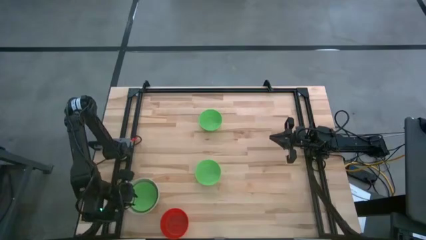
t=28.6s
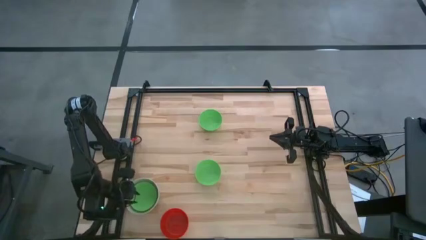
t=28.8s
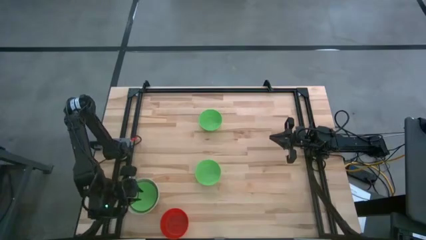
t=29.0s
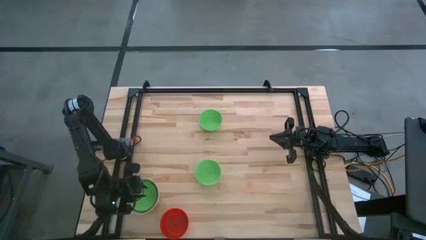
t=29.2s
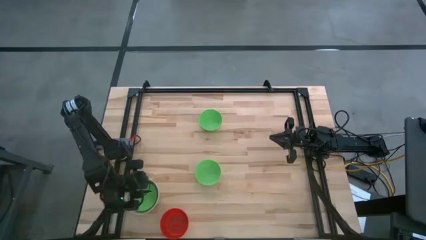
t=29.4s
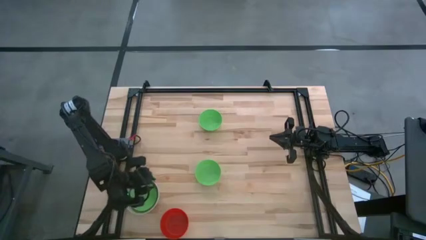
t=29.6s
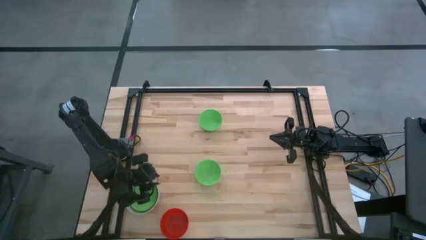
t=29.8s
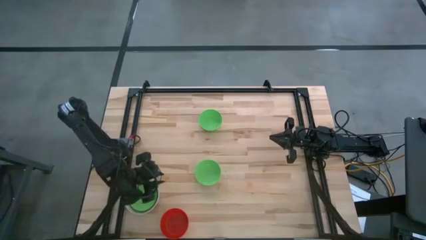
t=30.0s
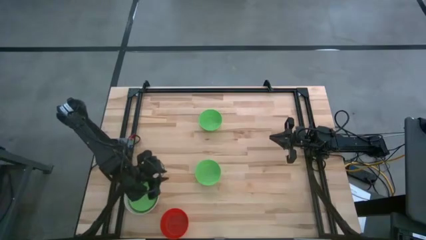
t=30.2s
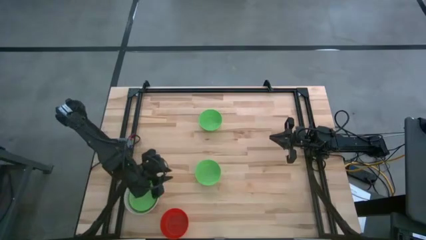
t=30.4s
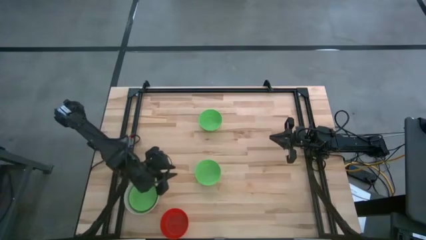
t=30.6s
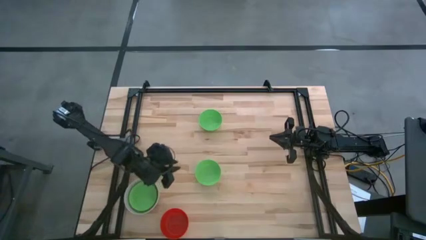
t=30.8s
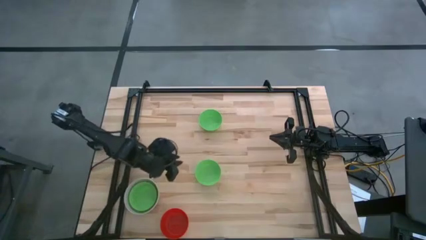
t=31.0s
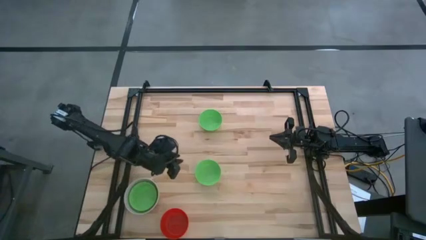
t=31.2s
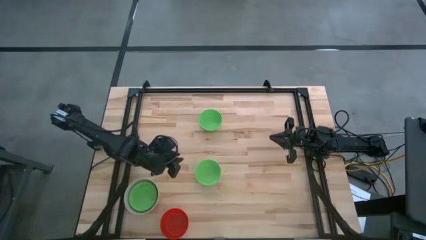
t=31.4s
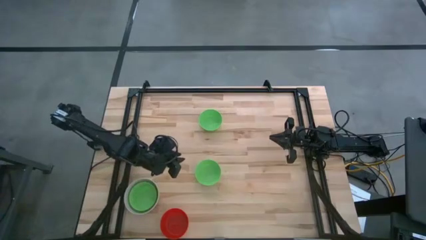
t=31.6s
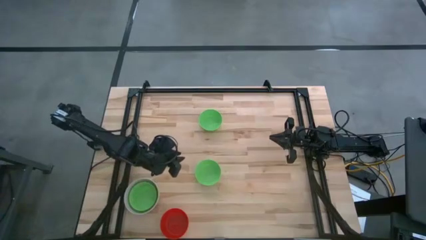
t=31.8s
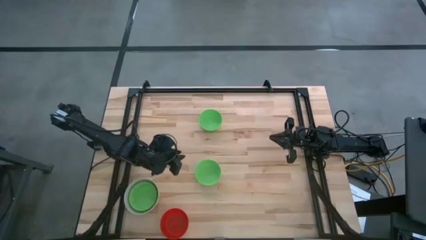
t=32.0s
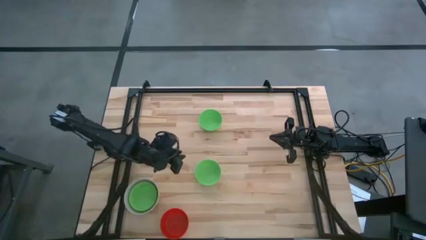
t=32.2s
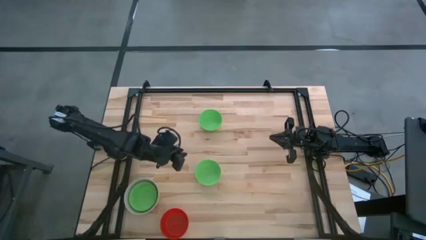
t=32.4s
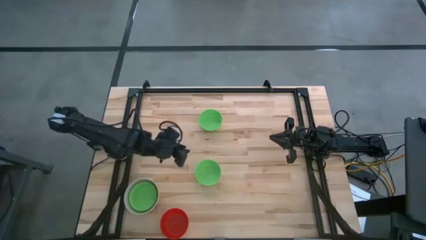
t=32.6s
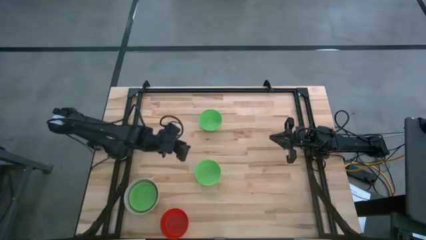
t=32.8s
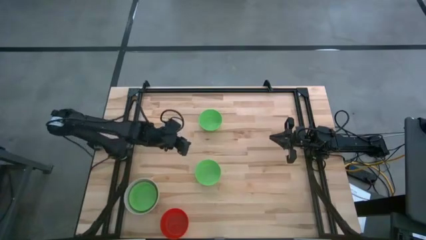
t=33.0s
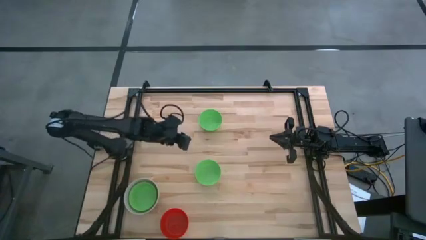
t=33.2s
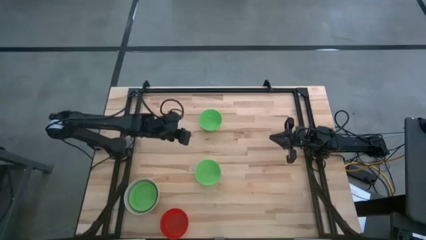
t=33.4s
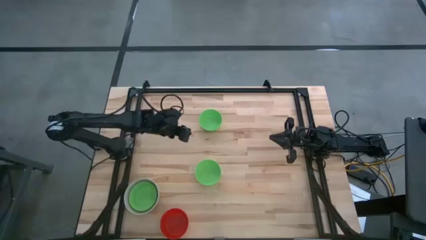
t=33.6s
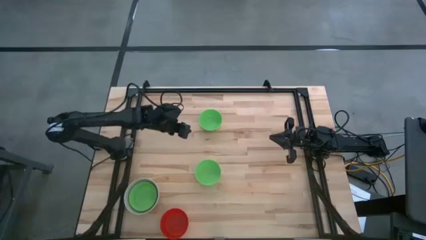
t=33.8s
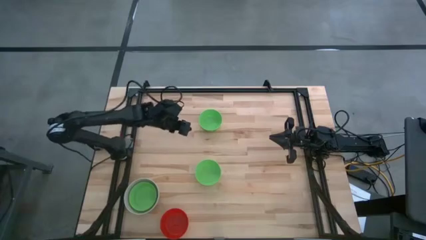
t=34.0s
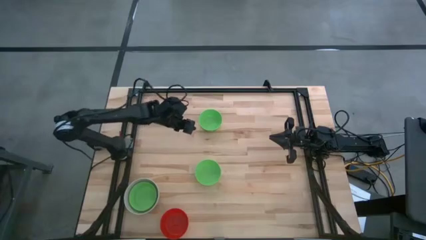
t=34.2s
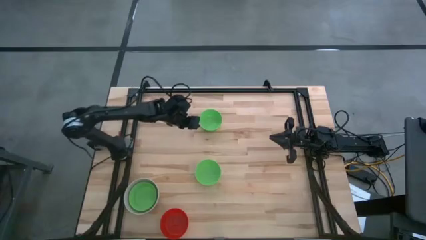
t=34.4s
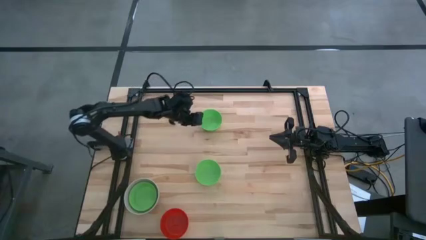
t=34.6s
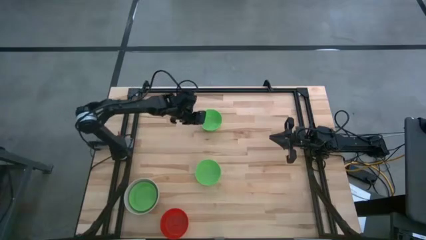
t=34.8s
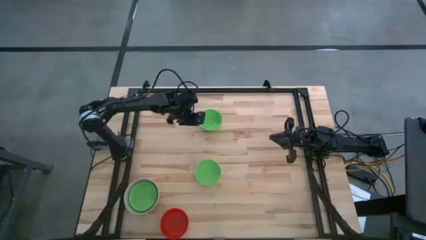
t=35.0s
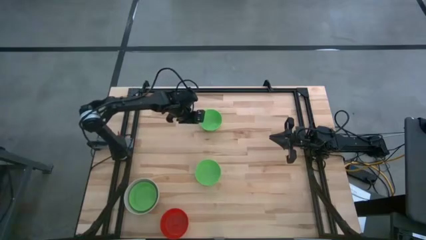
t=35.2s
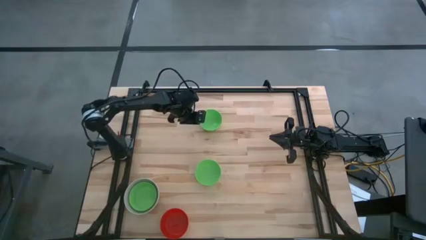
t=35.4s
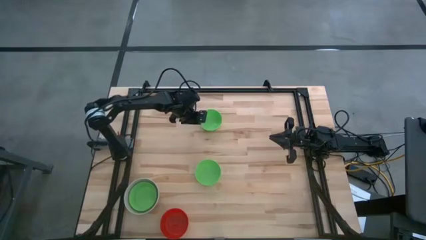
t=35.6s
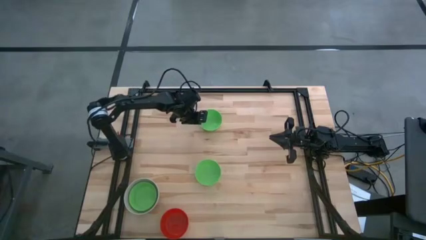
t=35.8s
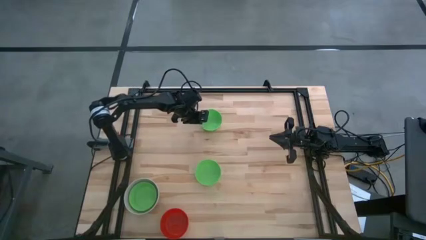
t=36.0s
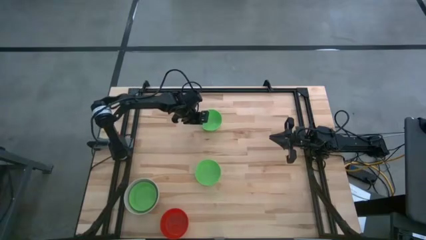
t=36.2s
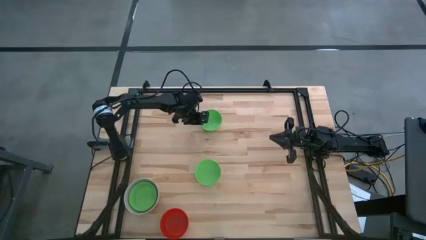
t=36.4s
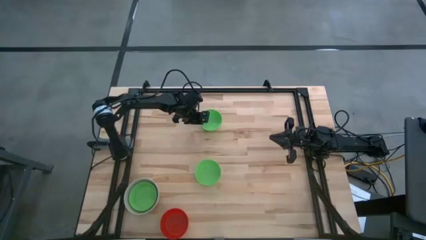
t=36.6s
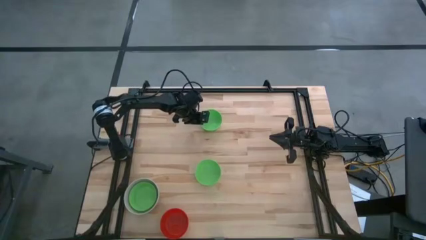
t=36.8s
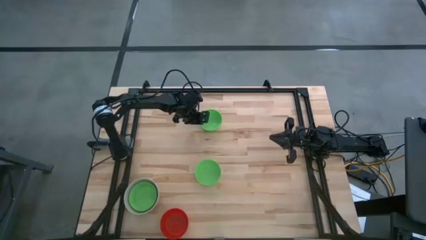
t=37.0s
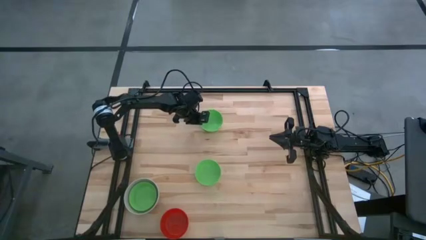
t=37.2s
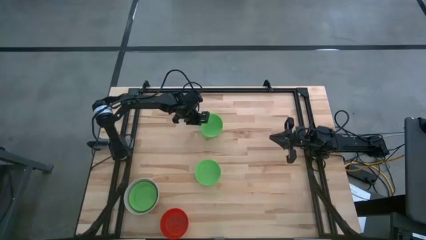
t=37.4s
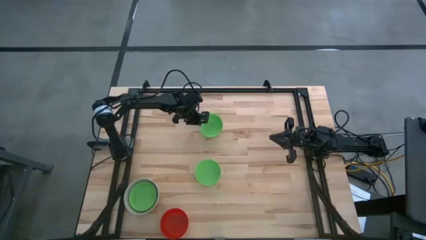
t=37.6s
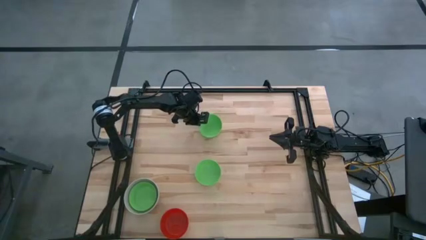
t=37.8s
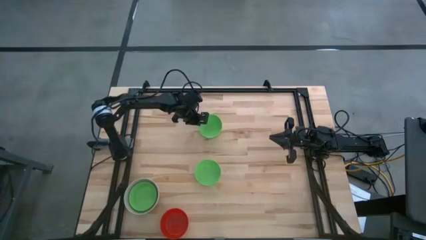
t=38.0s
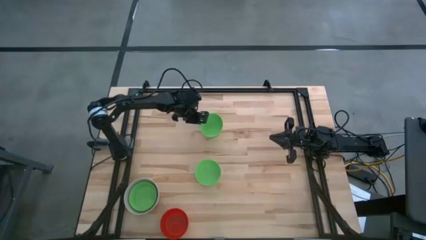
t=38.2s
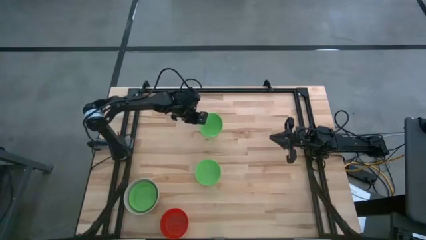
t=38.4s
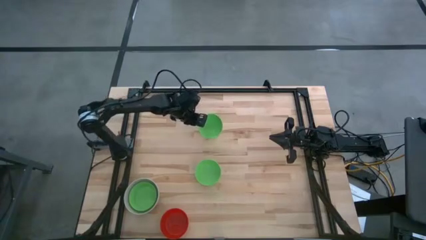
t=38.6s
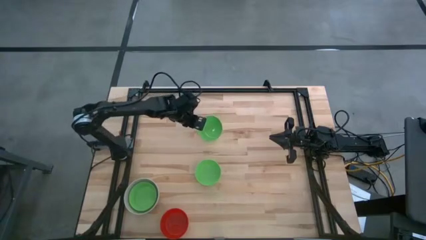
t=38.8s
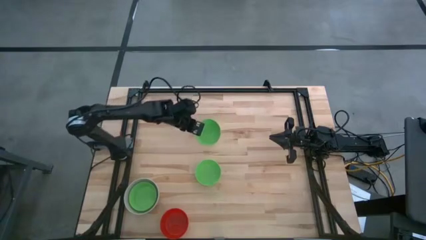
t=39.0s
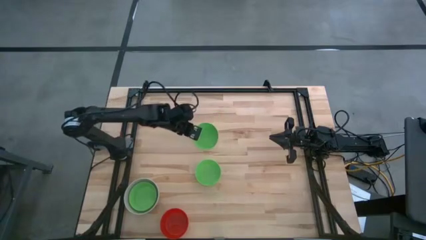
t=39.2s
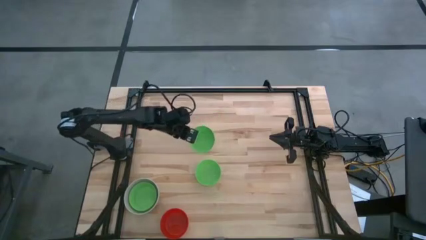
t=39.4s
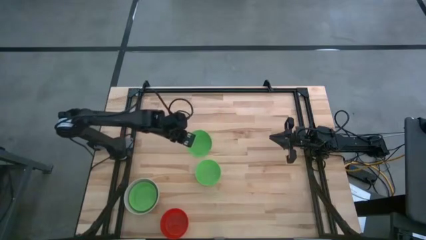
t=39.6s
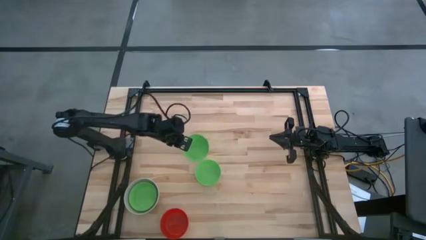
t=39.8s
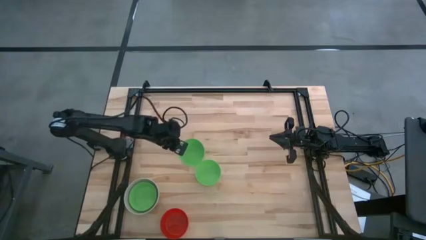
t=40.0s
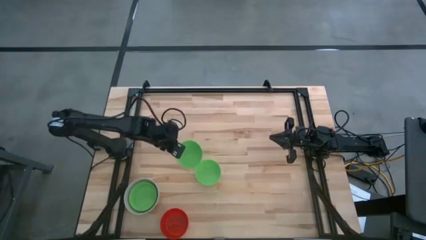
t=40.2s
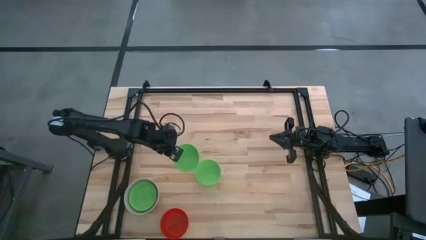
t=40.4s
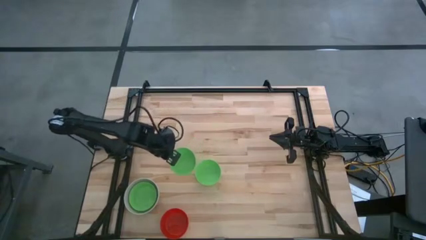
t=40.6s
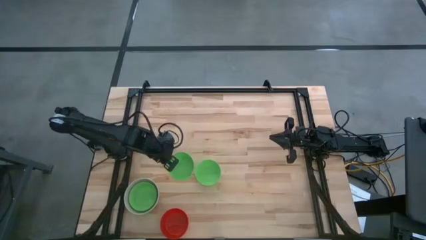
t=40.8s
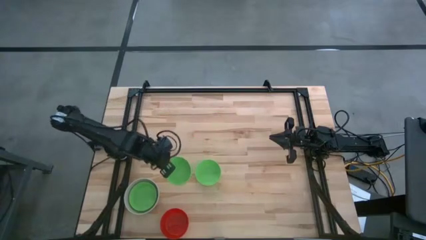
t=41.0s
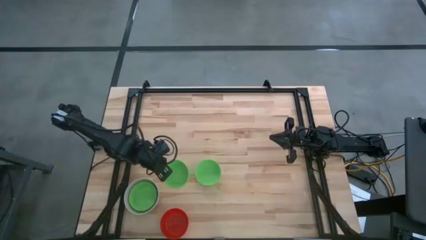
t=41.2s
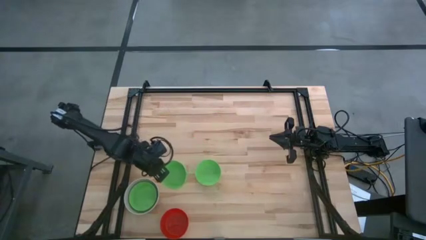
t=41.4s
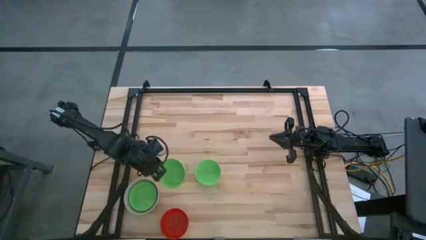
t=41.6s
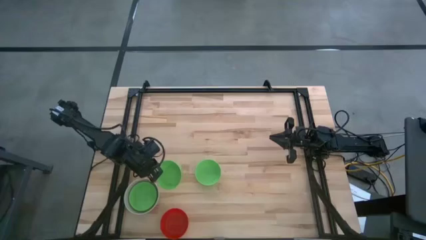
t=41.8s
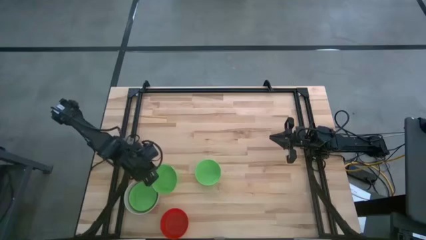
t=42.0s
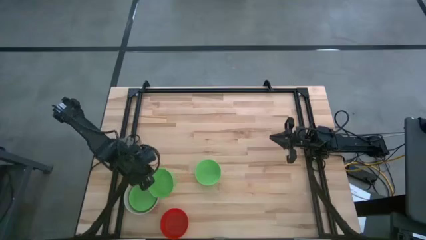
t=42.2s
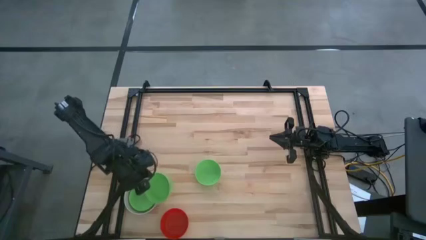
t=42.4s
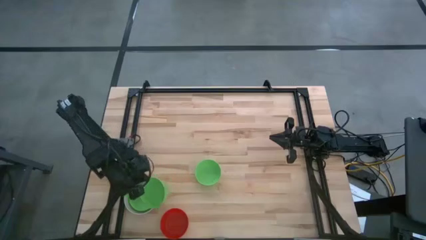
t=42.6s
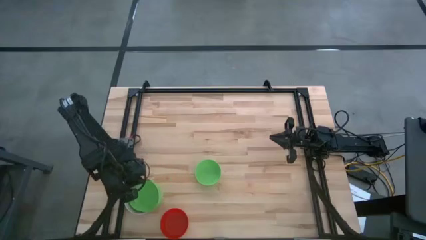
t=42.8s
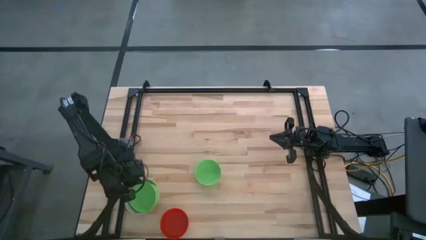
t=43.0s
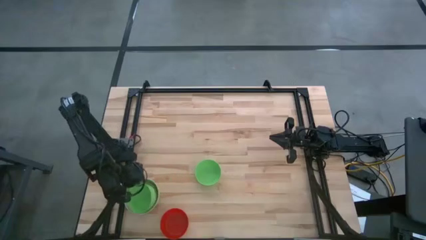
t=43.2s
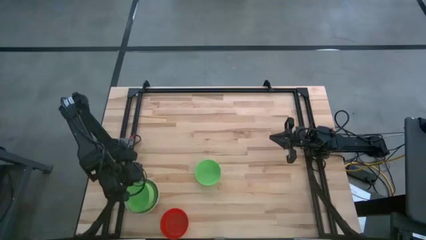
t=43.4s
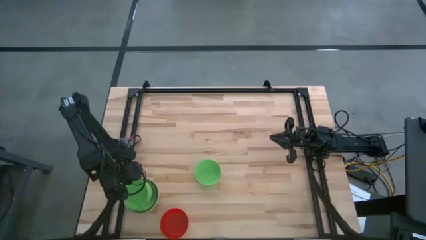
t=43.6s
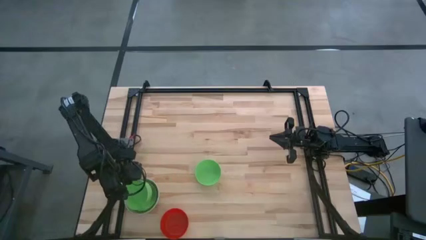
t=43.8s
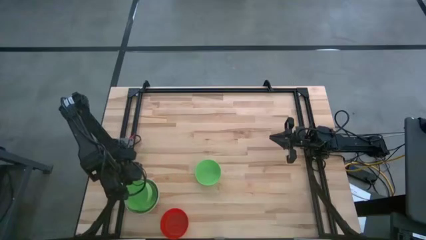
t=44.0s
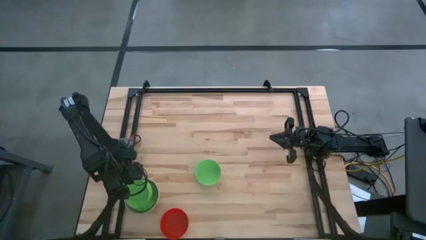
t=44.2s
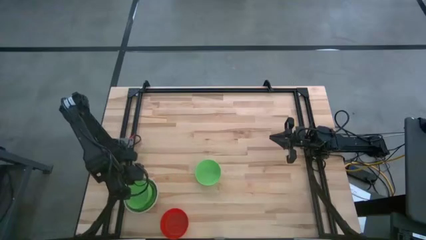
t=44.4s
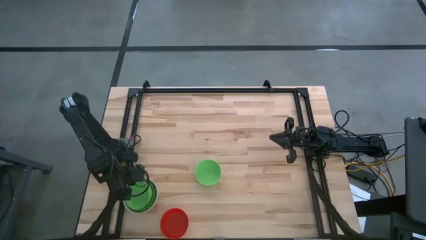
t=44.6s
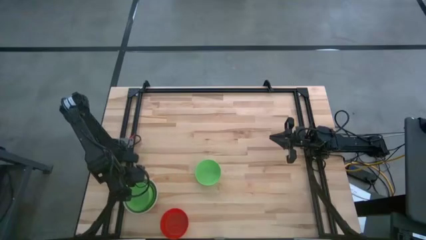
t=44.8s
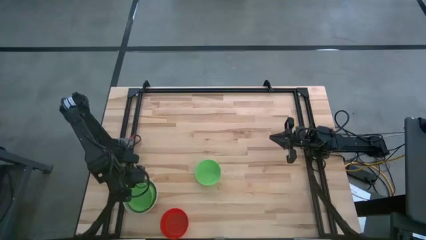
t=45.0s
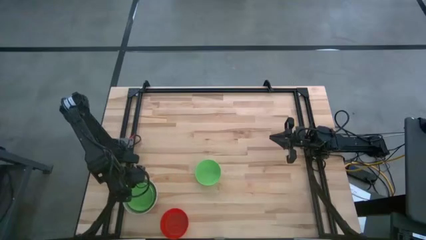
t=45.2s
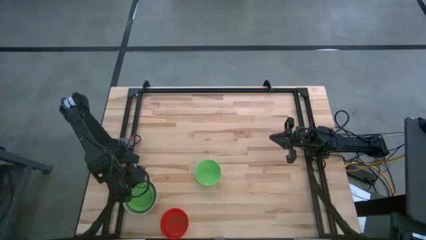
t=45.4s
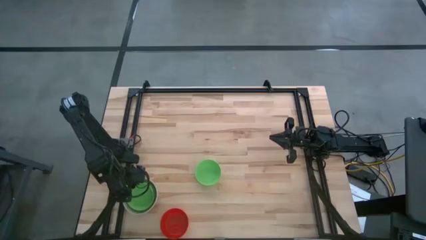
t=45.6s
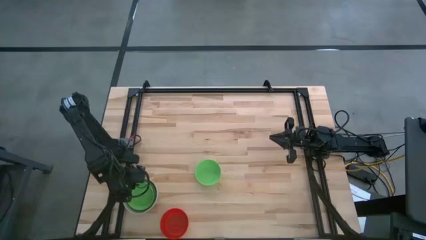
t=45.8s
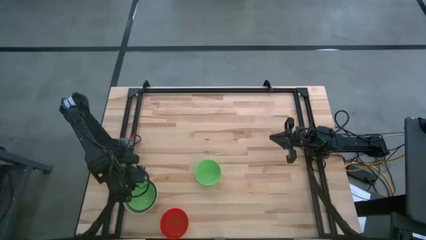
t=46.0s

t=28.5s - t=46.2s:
Stack the top green bowl on the other green bowl
